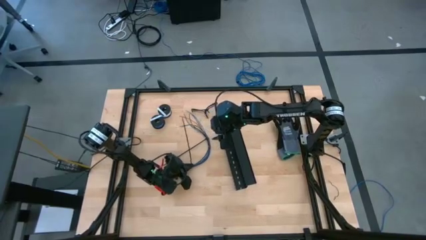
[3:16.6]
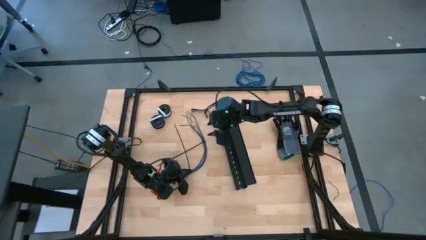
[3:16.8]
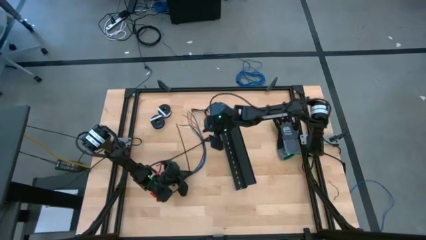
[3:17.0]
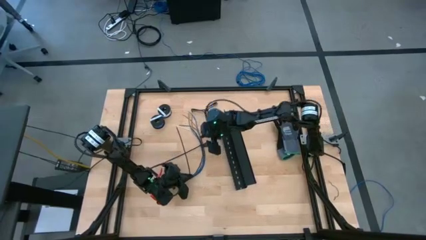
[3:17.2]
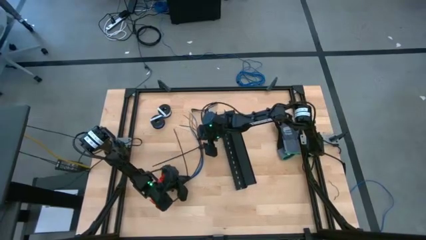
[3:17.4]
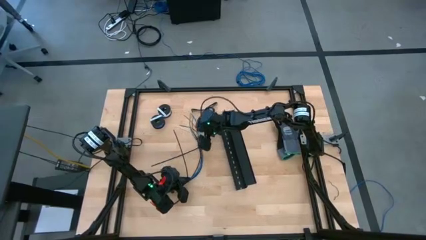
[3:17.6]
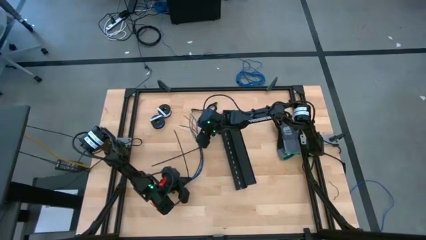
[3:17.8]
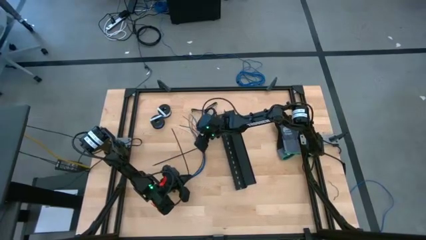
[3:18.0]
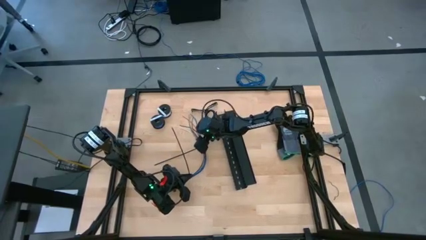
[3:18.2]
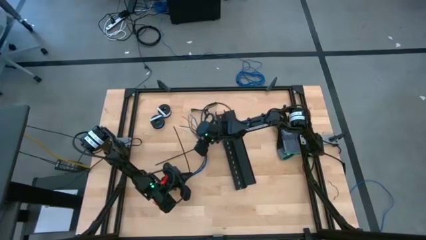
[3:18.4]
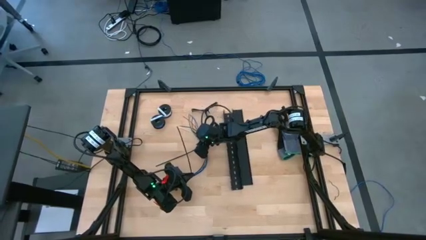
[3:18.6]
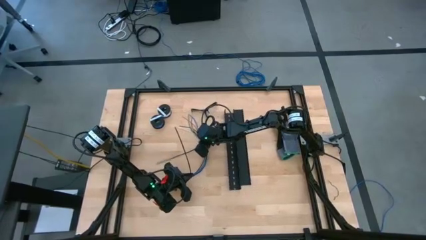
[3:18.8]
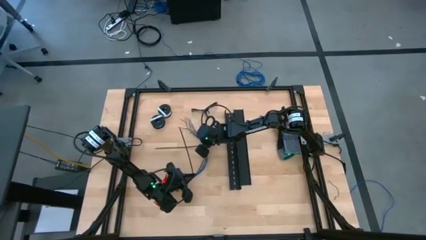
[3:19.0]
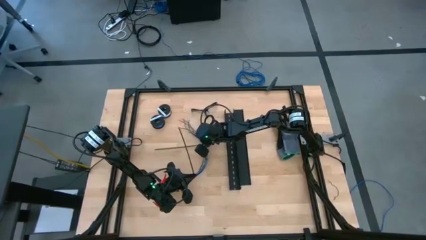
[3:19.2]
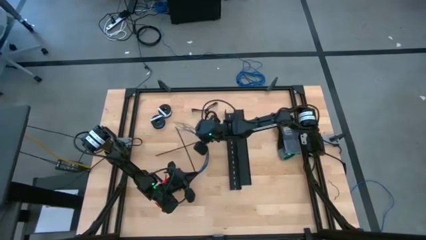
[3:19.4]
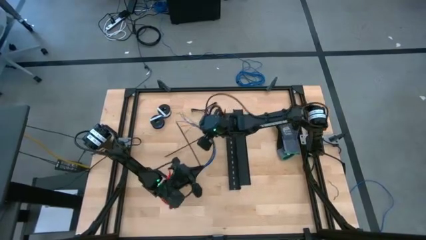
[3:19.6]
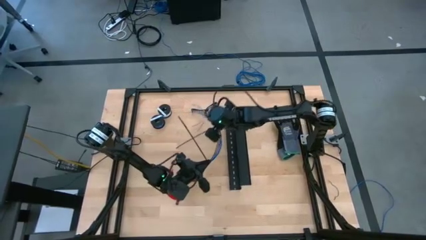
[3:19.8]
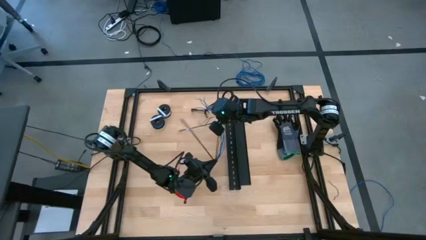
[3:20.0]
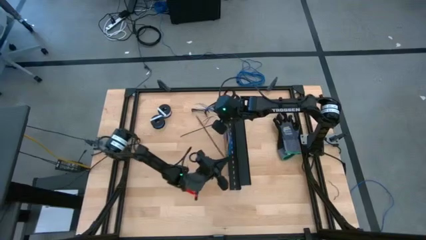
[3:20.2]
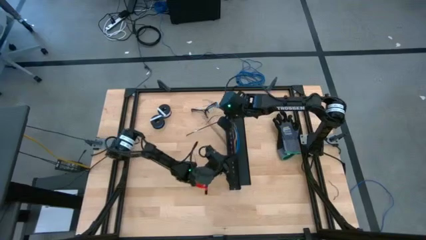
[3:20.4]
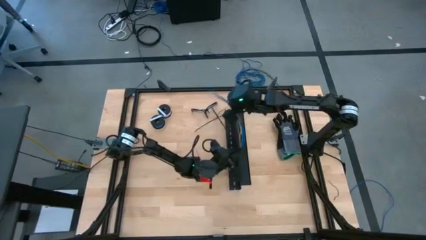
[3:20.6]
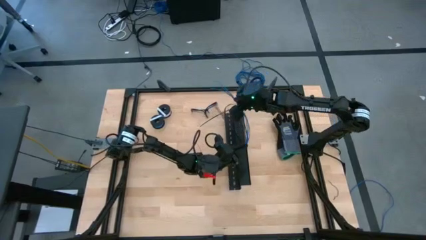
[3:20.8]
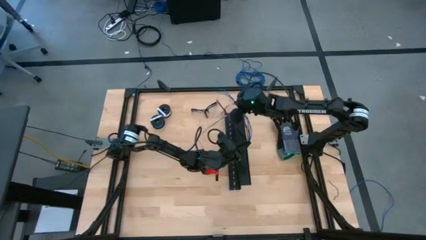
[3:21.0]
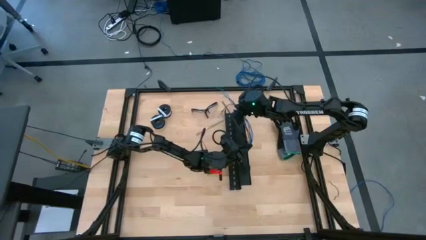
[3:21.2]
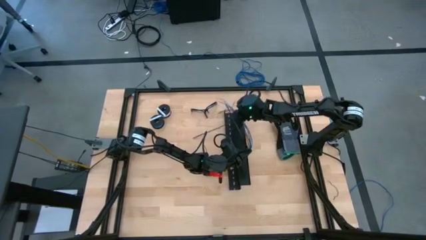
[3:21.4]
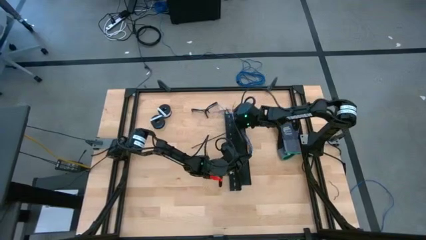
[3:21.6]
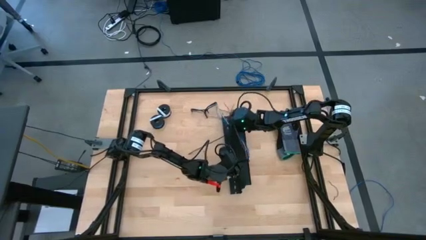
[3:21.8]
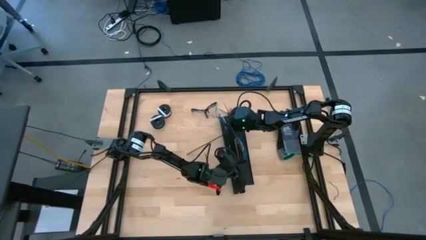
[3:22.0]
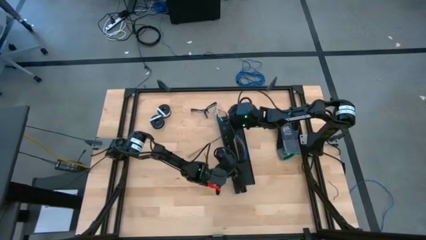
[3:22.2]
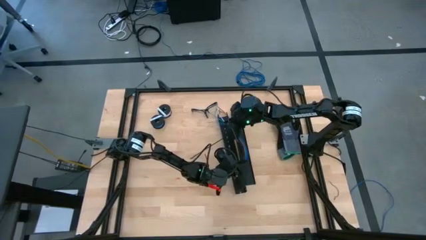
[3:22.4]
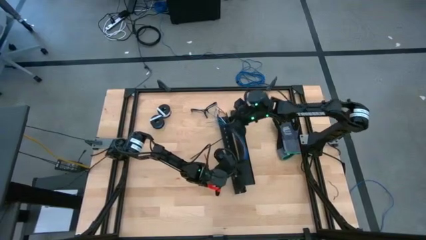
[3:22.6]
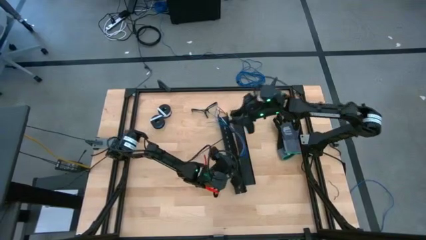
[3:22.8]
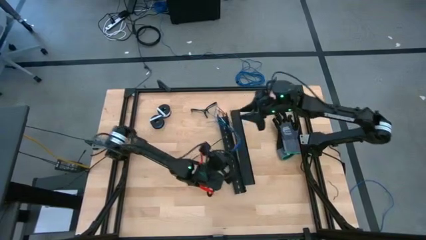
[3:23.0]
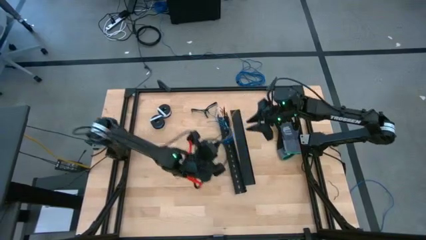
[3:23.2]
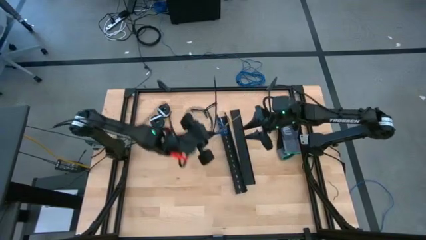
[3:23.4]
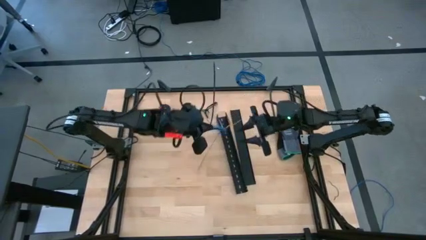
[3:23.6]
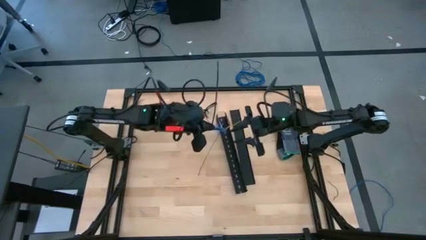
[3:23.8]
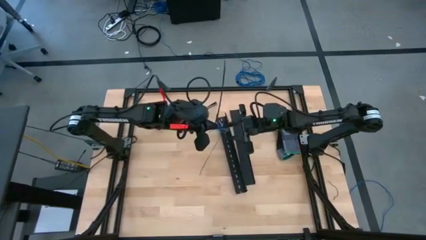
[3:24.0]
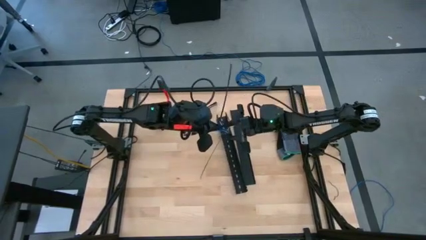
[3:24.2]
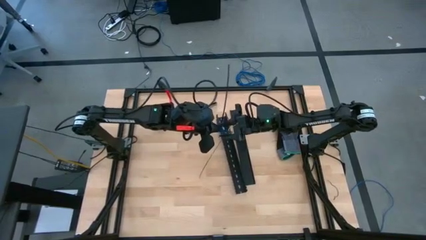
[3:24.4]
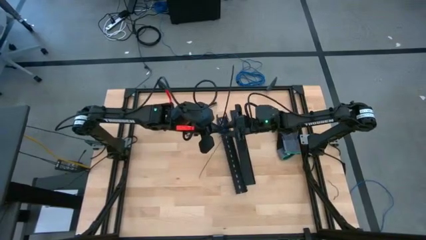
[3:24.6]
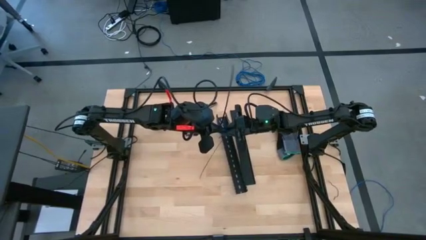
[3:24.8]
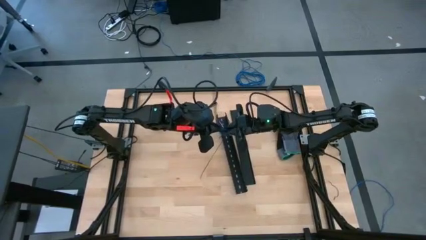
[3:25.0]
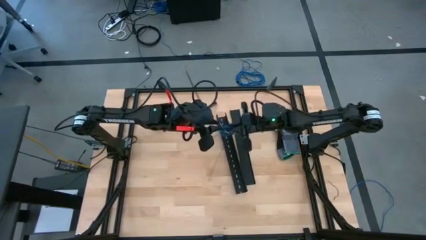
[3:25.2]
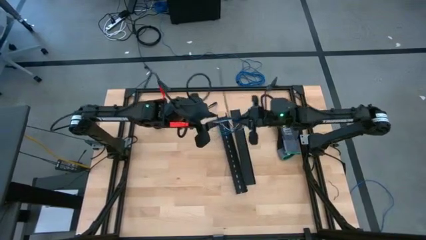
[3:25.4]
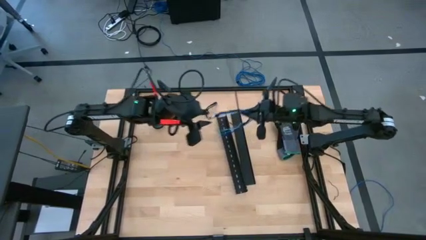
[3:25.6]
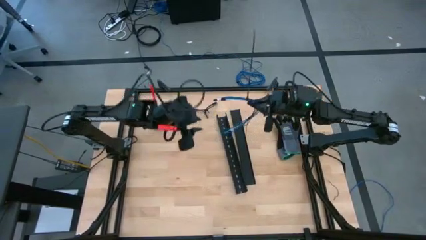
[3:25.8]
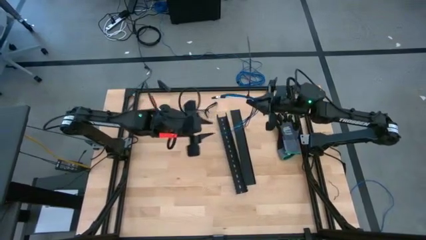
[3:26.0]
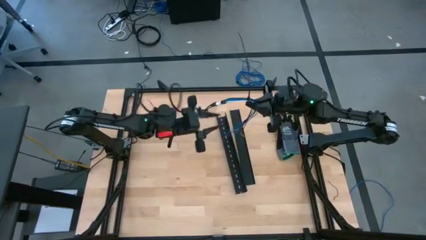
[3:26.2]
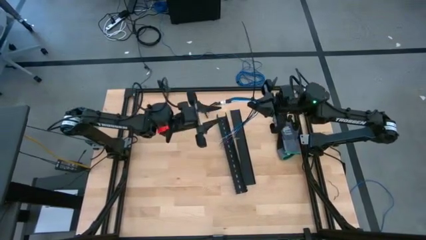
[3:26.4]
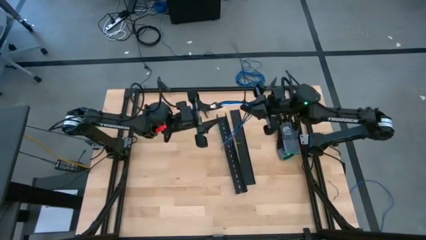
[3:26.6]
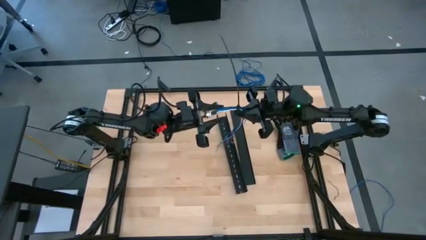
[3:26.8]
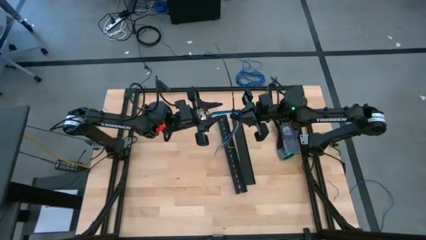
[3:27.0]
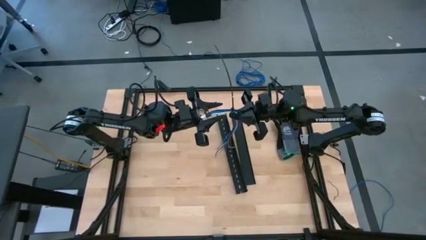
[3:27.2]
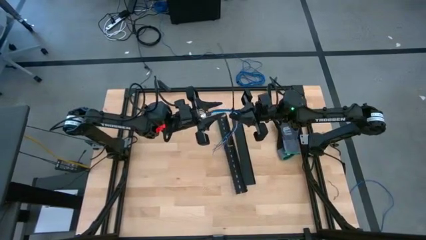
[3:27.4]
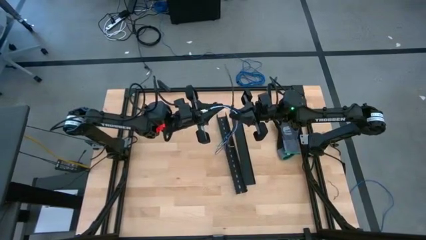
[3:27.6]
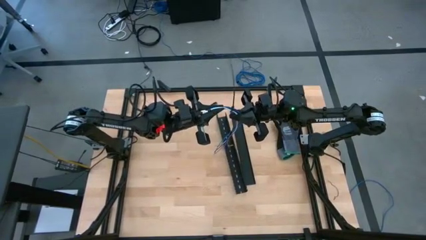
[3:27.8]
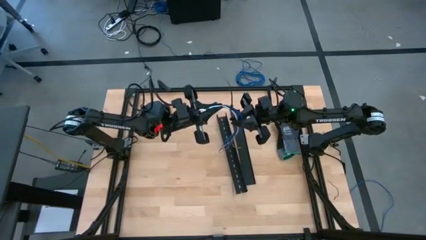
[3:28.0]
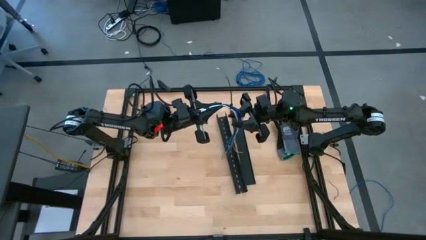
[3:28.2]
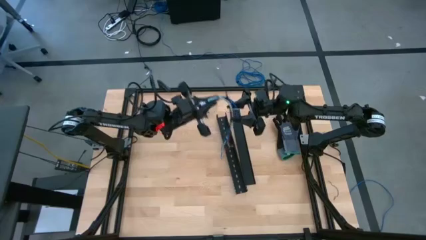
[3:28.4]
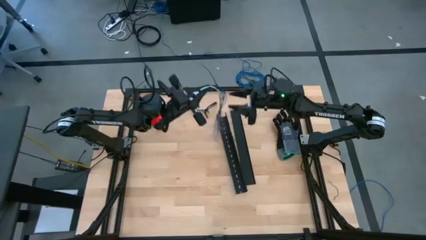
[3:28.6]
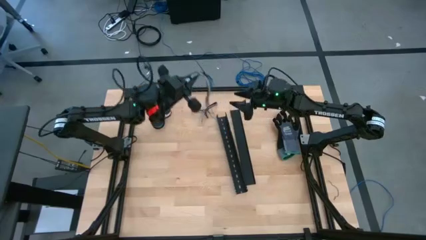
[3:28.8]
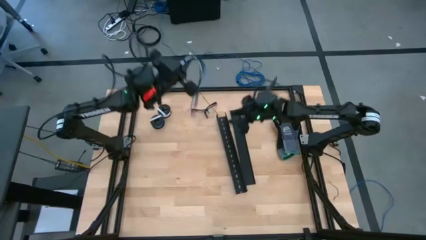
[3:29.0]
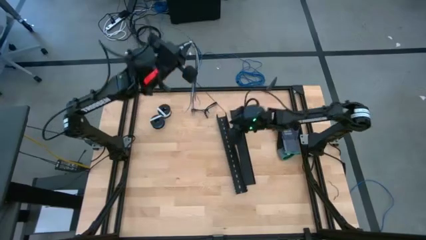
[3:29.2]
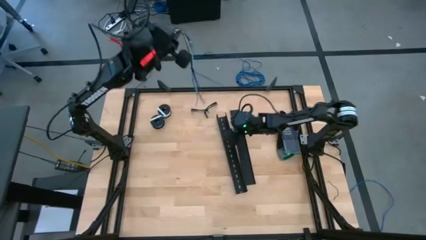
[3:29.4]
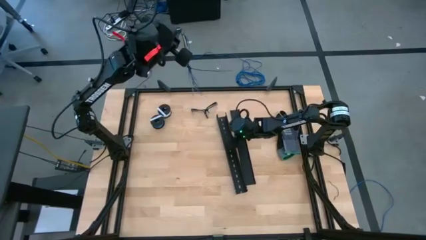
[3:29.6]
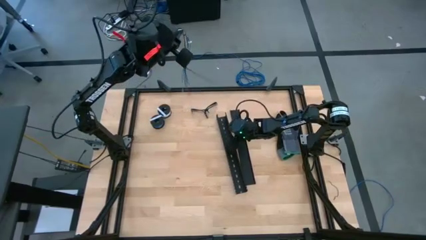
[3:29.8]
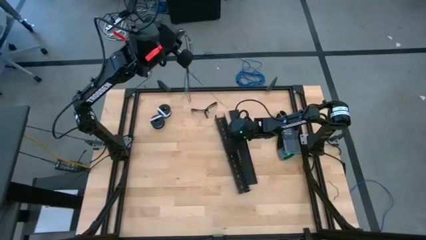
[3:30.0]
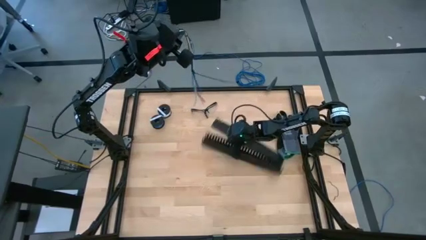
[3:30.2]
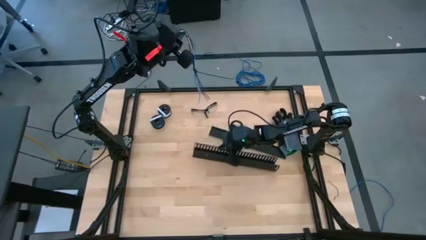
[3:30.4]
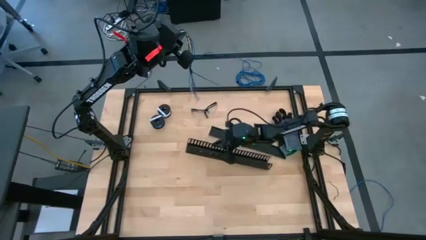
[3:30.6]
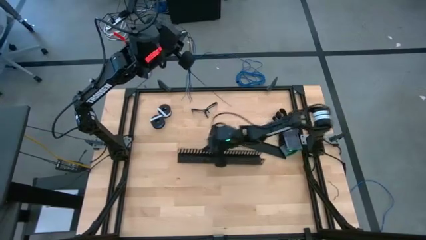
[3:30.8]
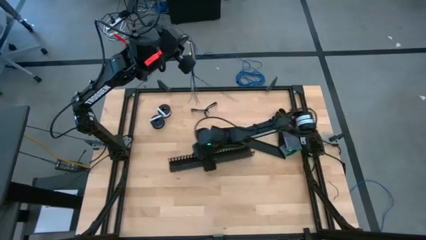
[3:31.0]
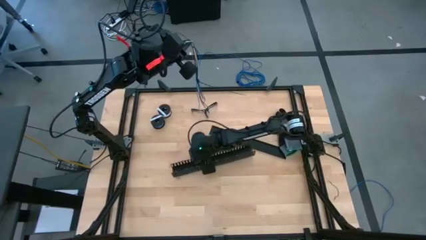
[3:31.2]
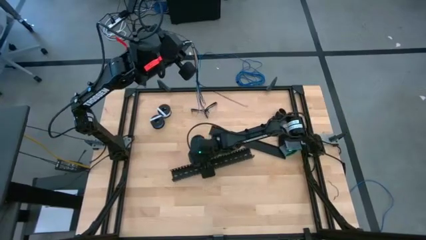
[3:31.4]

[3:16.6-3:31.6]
Task: Ziptie cables
Put the wrapped cables into the black cable duct

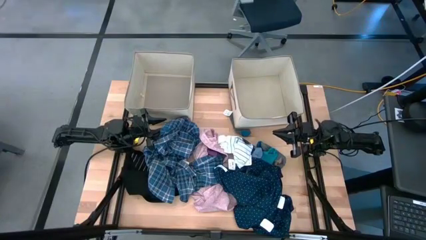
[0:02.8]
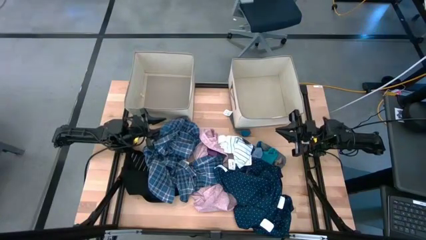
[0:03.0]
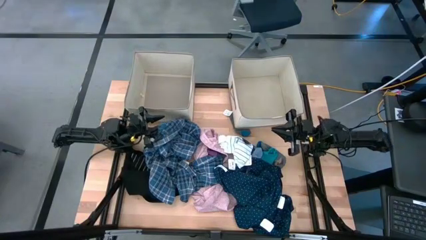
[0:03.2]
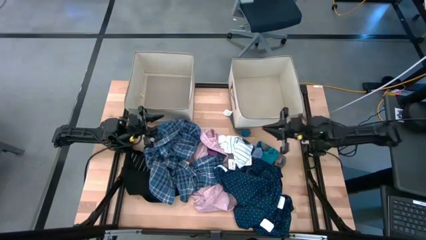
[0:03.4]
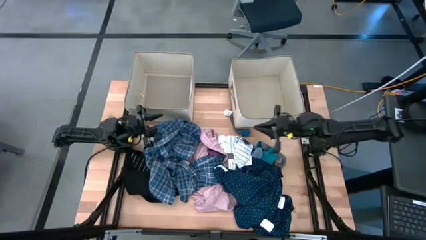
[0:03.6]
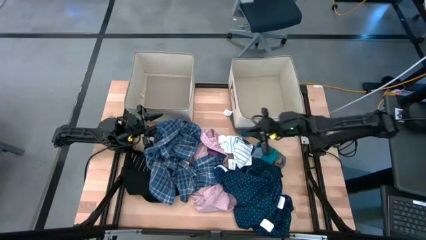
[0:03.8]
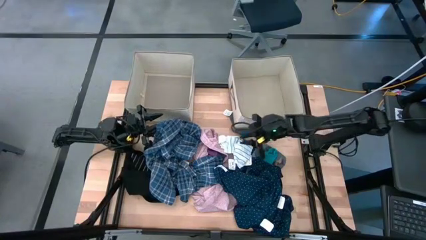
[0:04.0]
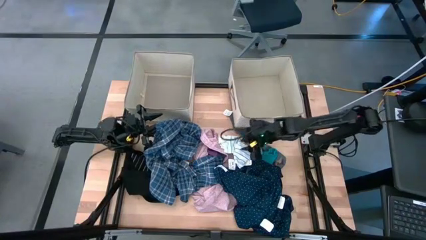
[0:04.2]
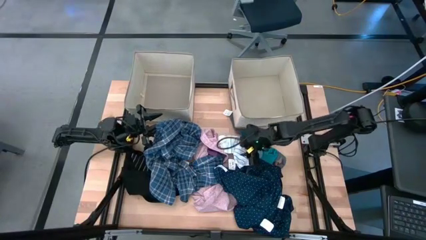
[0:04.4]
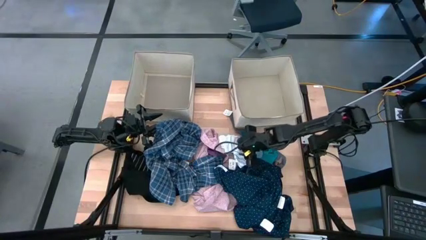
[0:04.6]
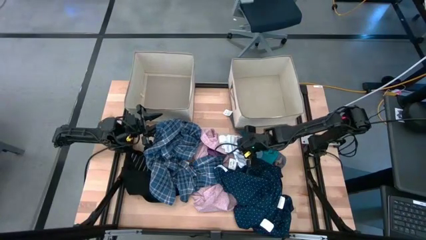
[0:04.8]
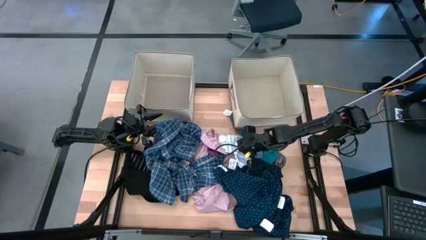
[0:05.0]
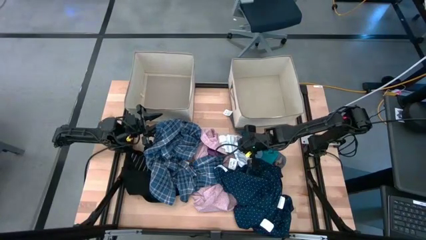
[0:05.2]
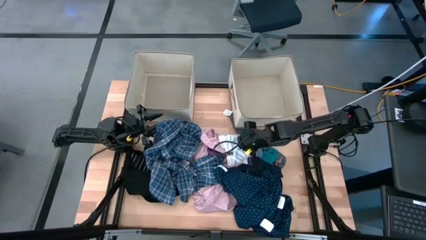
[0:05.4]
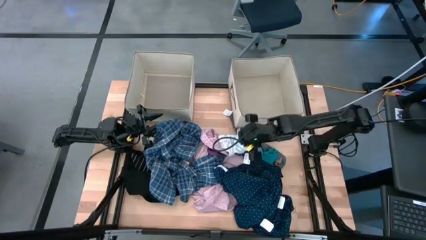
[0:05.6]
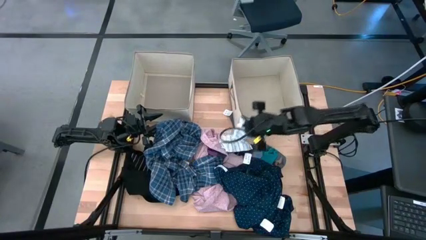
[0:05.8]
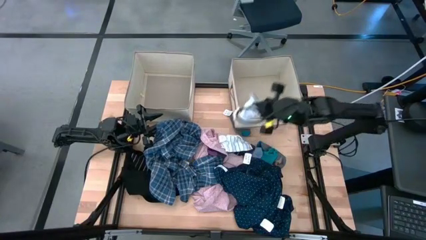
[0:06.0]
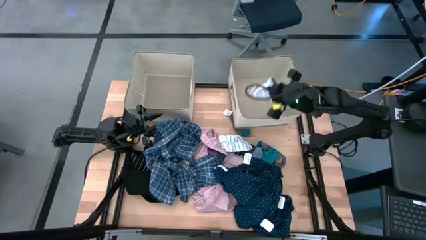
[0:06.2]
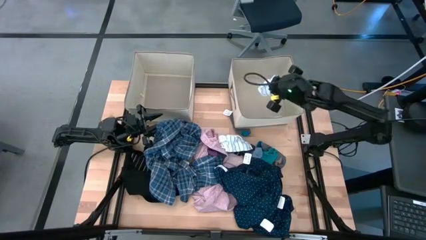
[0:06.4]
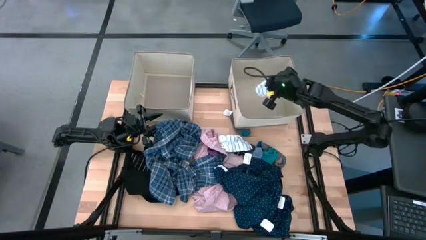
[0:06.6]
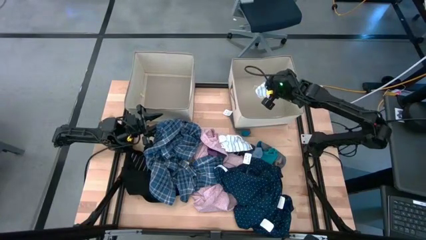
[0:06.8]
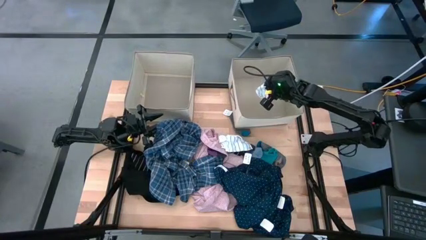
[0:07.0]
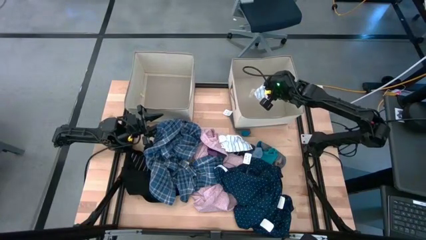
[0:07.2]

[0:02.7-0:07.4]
Task: Sort clothes
Put the white stripe sock into the right brown laundry organizer
